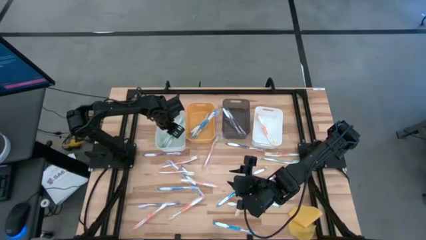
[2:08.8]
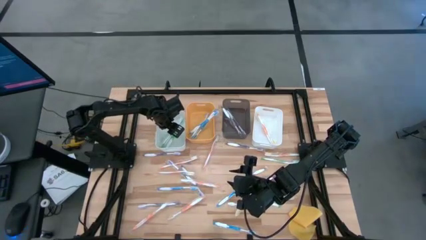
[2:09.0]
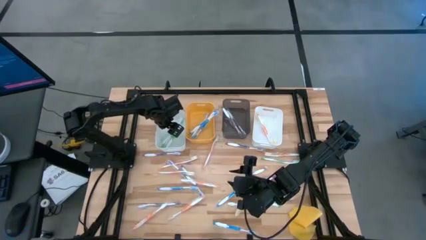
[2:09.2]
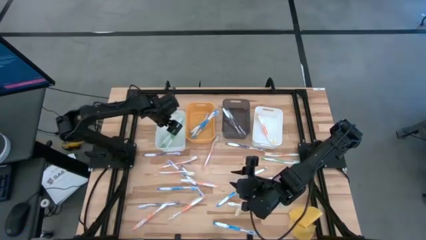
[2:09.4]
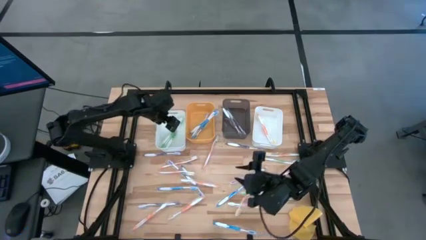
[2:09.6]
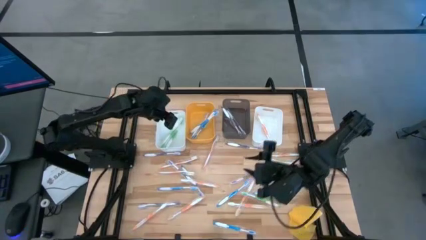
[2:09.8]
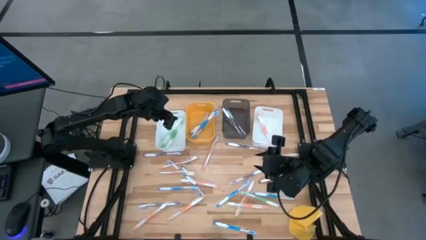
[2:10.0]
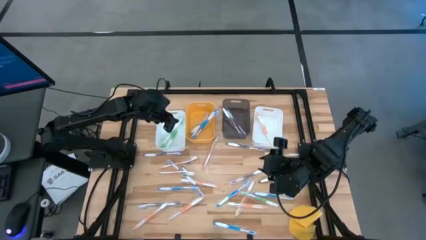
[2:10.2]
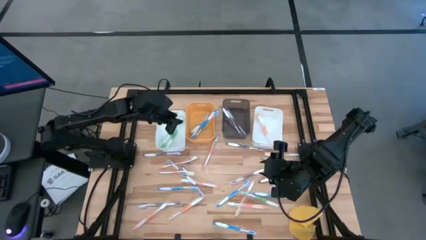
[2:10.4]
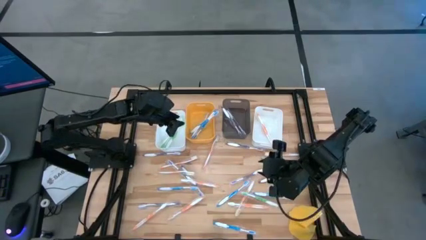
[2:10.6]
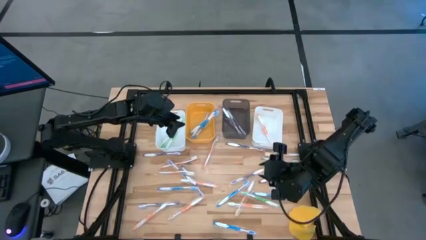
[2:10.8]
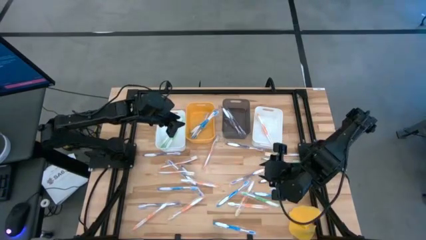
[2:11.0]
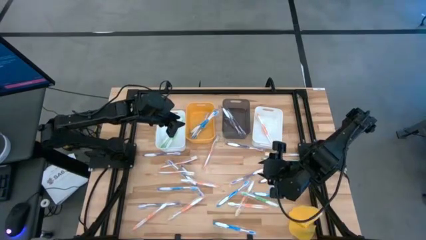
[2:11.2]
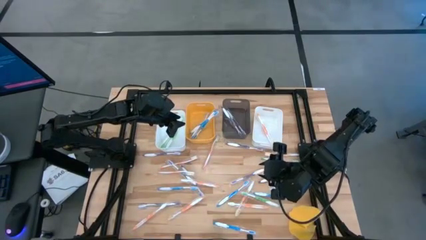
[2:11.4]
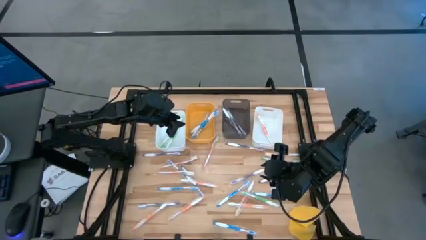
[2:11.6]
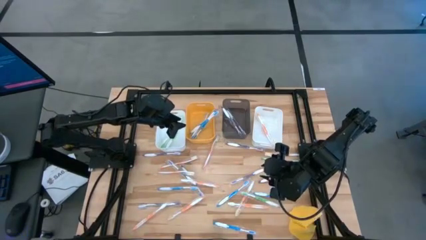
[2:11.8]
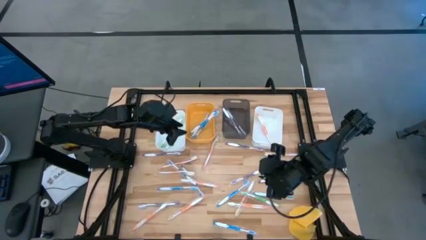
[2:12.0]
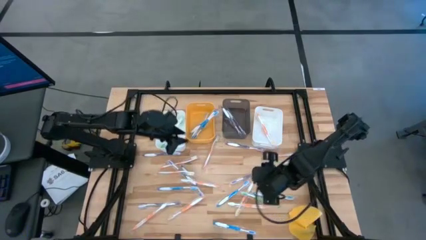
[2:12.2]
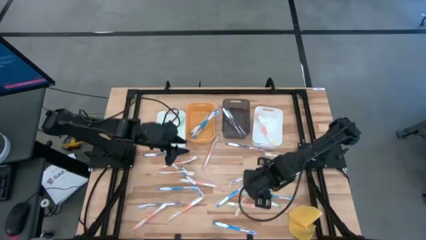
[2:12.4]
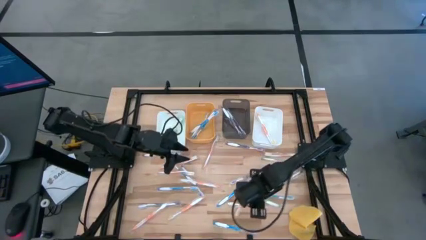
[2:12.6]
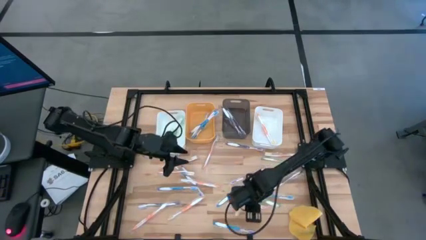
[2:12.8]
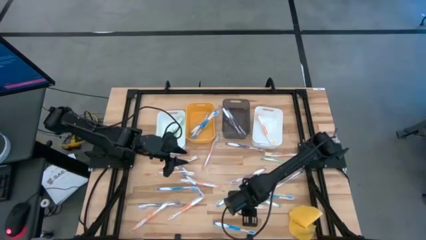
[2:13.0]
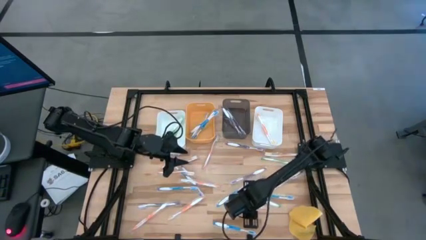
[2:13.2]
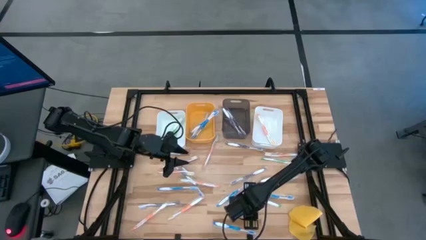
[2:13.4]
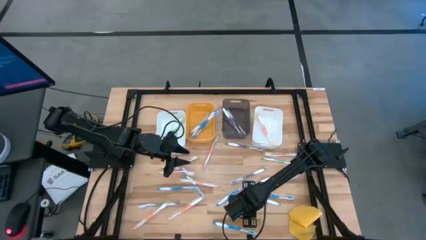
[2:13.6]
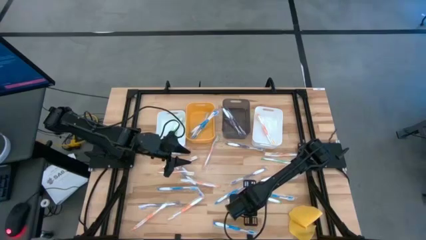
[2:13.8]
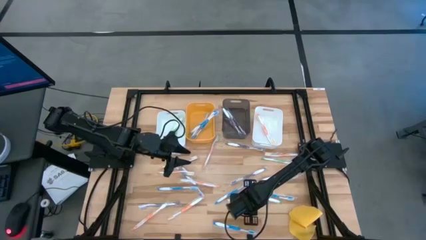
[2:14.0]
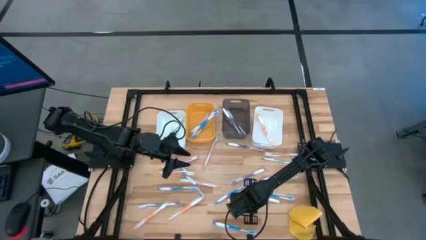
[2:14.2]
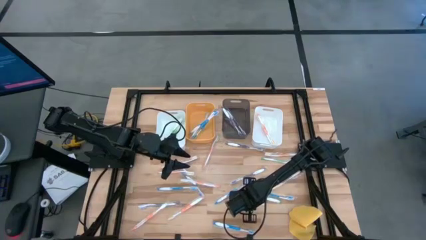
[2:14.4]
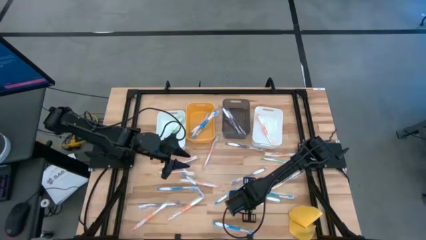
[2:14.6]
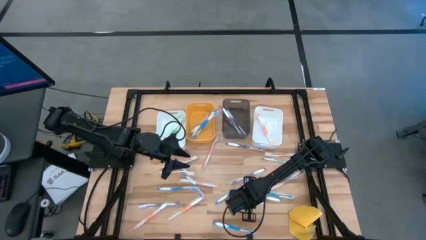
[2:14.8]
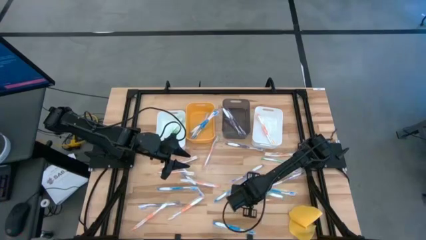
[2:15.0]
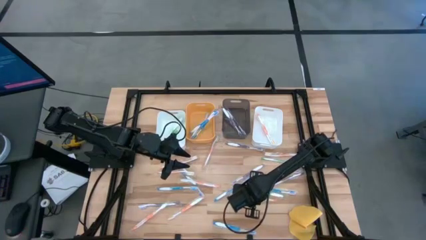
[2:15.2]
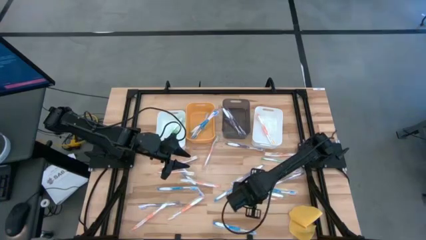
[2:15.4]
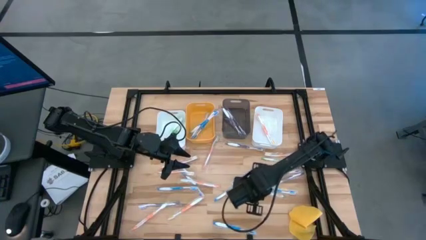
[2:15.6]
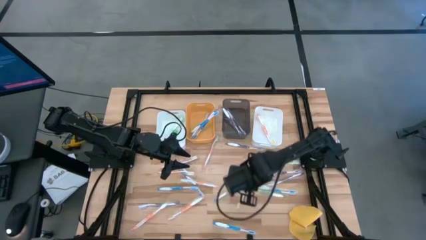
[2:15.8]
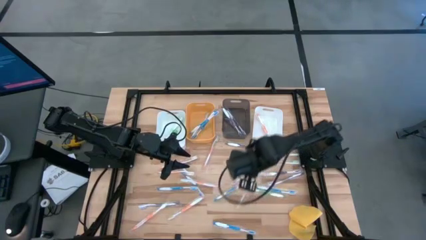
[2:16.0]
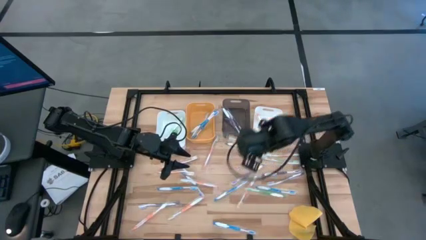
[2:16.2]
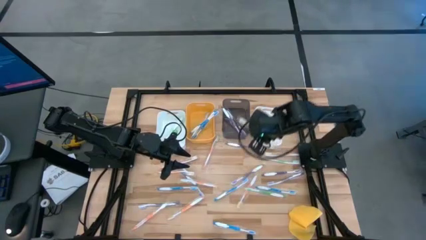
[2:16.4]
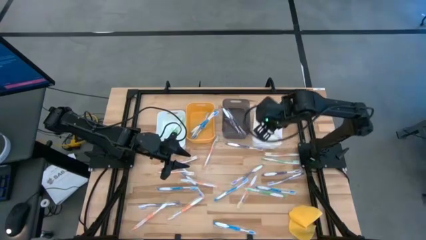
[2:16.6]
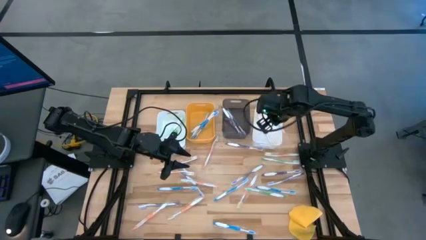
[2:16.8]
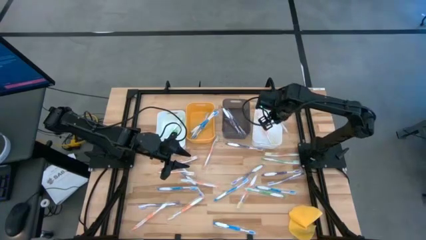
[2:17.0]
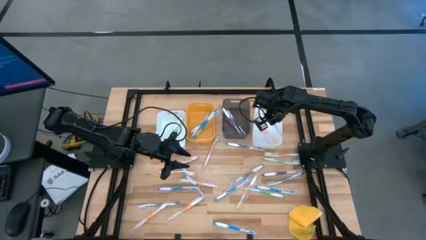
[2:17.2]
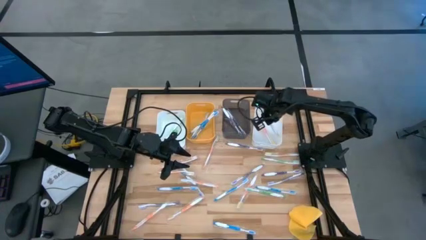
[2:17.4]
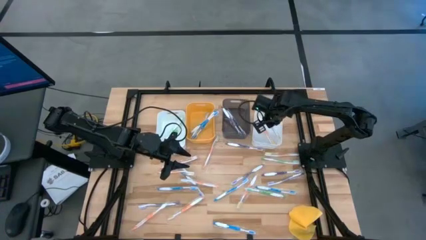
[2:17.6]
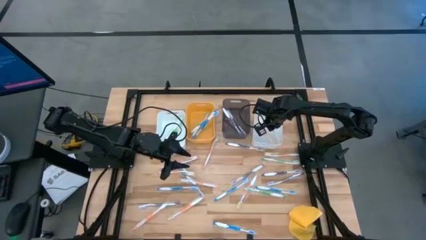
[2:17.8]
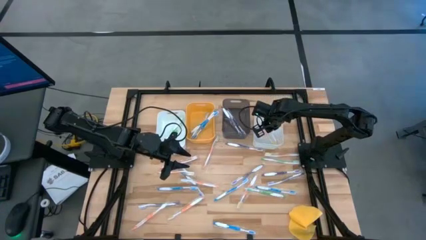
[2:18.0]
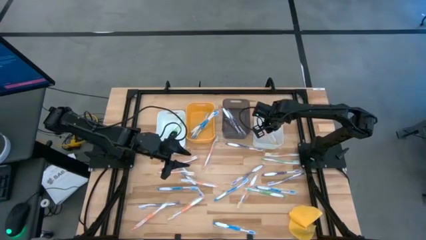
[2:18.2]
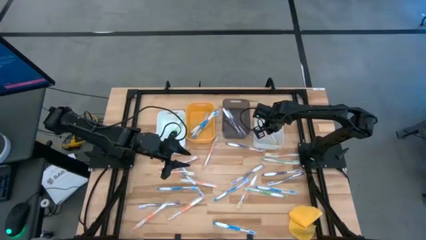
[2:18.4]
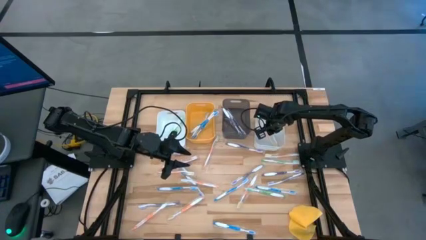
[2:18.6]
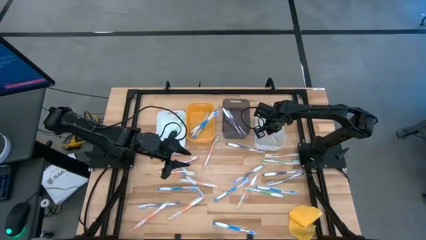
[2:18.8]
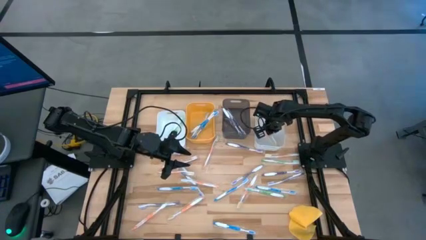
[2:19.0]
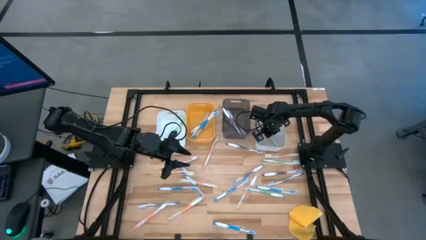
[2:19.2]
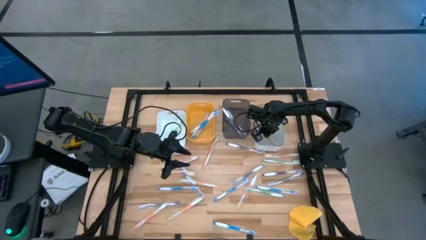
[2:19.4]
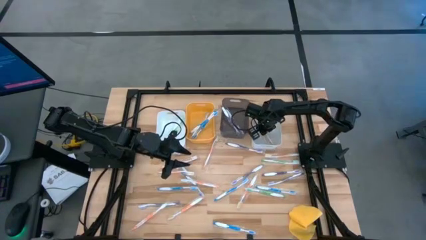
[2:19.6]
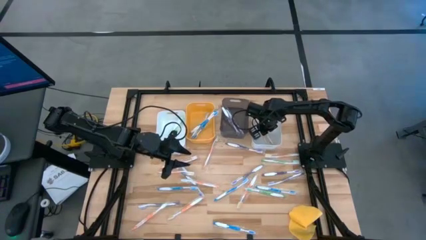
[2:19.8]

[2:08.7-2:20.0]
Task: Pick & Place Toothbrushes
Put the orange toothbrush into the right white bin

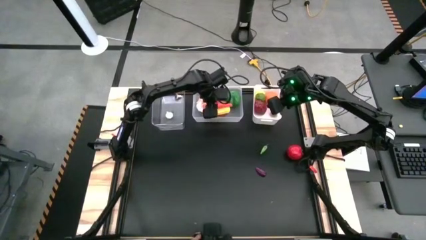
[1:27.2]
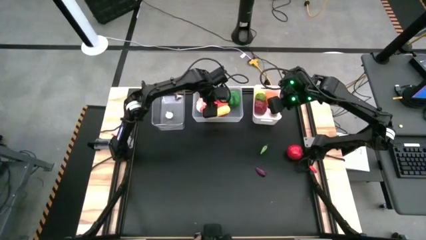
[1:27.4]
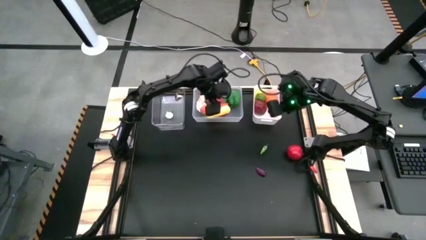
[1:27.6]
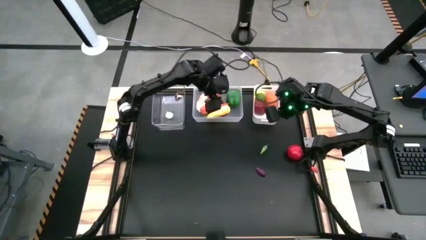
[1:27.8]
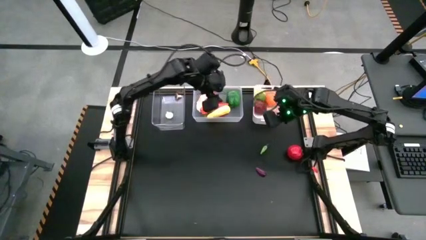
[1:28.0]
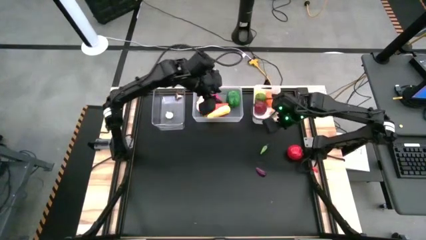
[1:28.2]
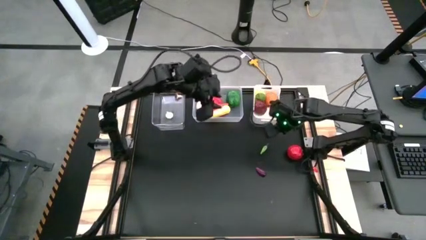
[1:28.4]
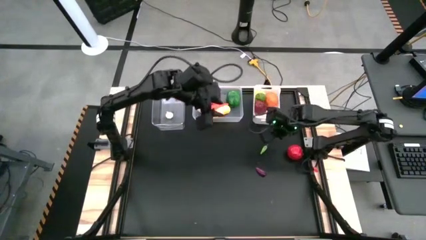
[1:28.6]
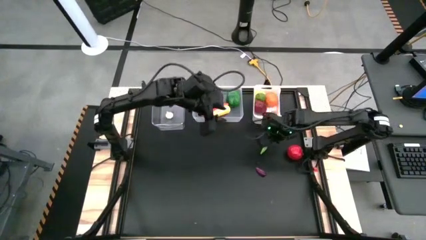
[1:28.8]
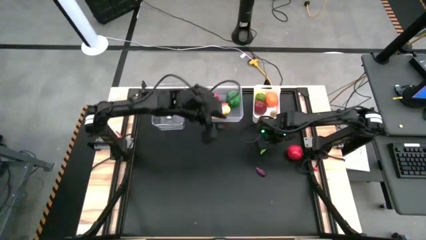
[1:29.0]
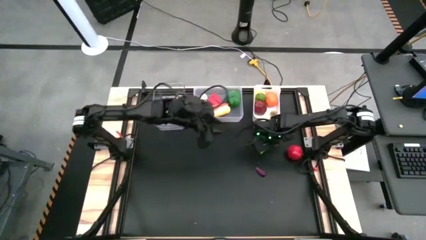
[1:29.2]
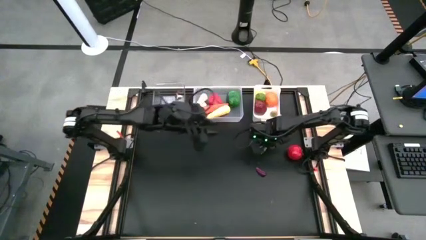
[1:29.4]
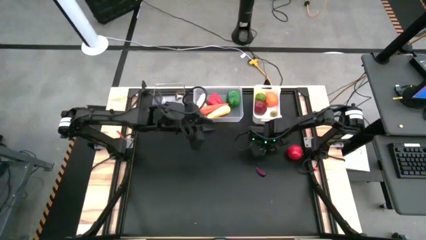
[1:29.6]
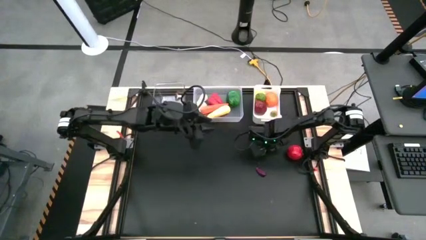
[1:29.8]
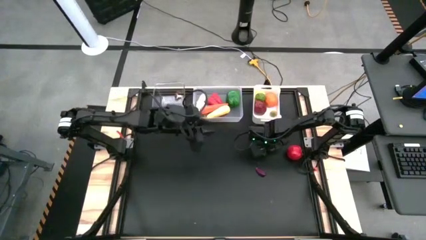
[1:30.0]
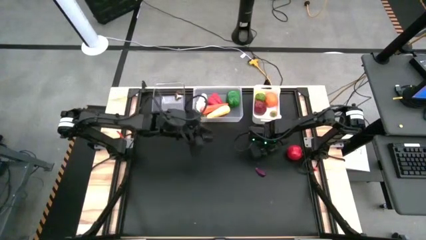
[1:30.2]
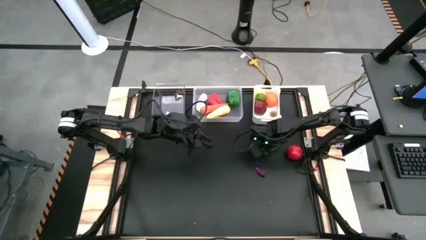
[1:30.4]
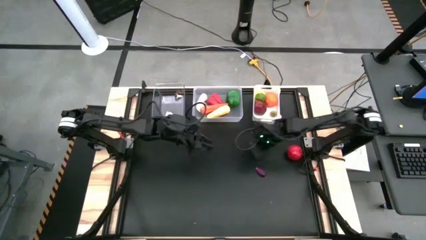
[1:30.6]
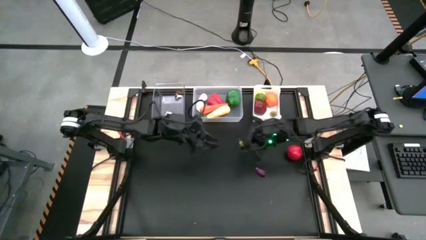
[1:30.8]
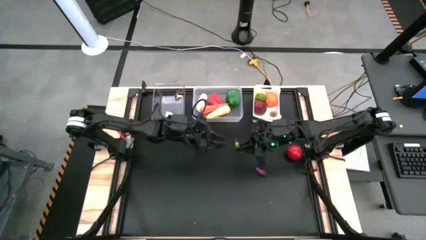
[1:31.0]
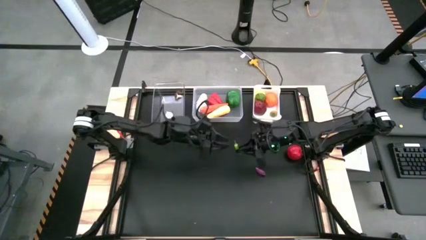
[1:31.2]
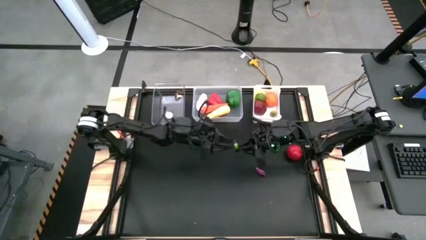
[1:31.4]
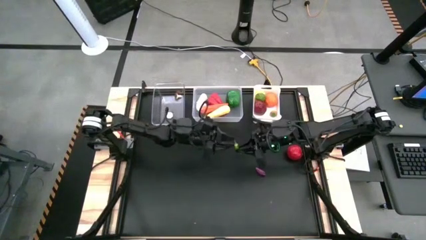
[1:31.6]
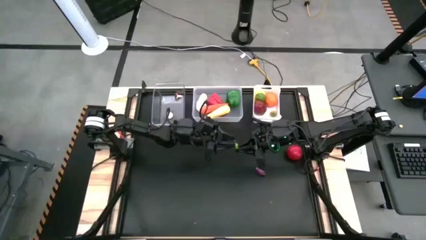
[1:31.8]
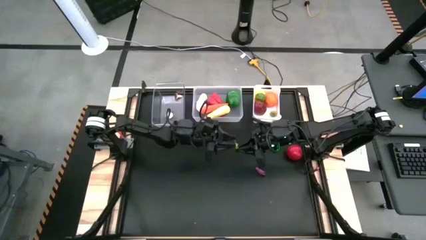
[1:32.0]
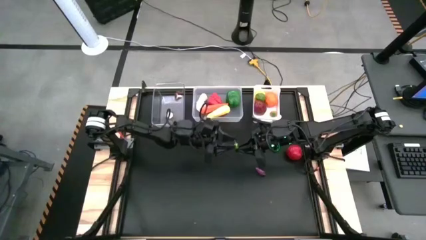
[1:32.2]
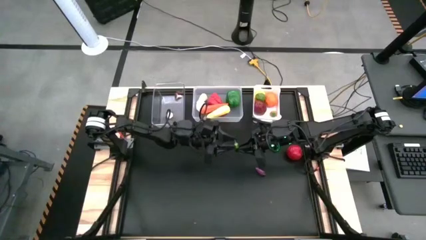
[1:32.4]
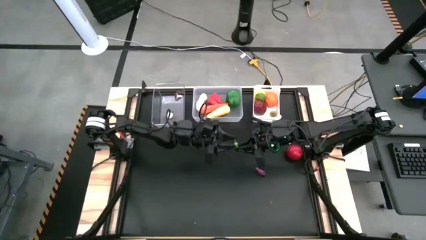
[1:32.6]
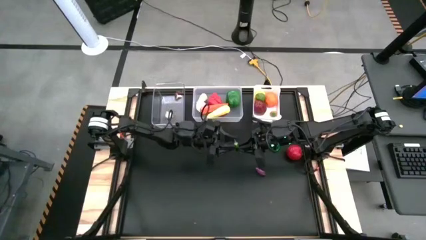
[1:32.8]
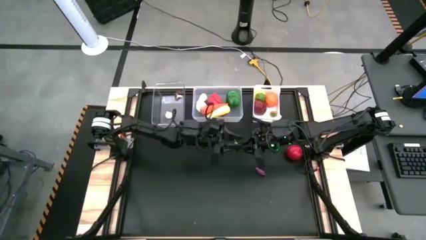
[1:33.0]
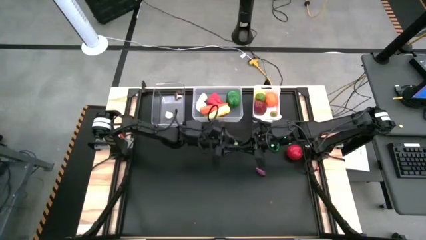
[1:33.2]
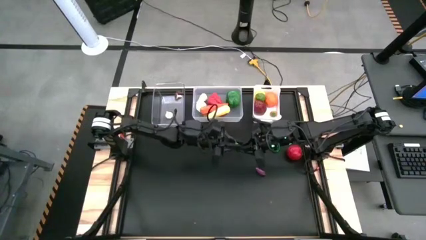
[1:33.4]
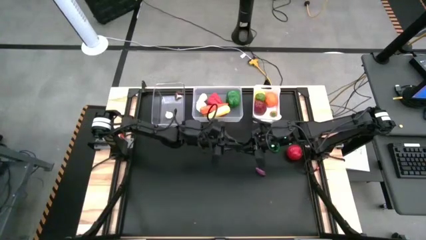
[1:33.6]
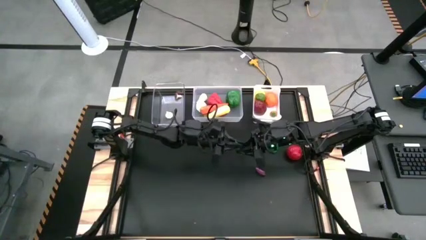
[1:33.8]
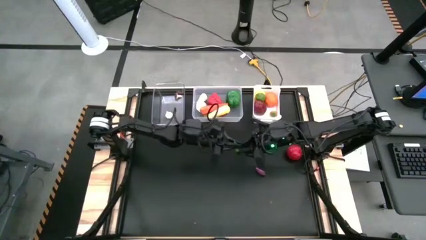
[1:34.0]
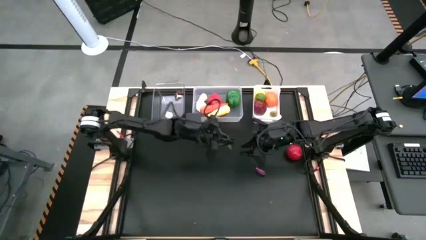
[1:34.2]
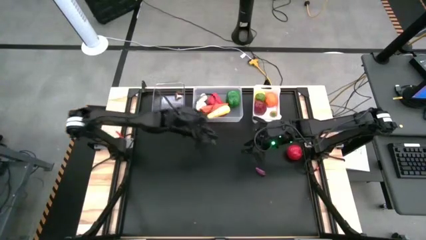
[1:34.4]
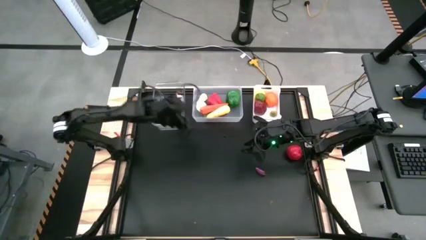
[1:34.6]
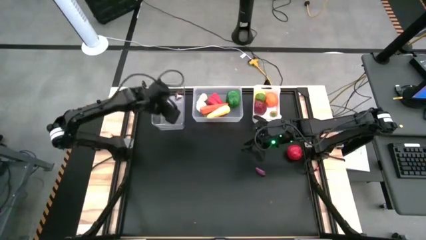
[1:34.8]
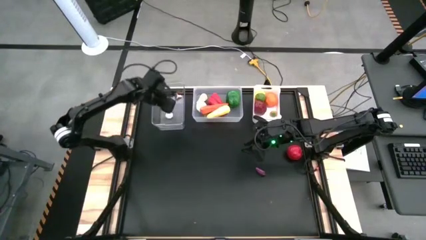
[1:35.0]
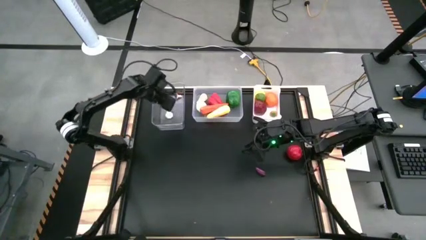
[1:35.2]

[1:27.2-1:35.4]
Task: Sort produce into baskets
Put the green chili into the glass bin
